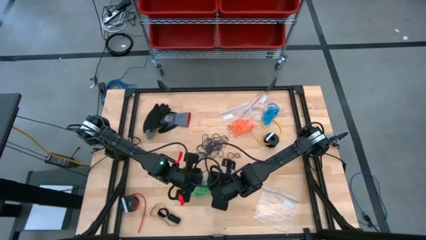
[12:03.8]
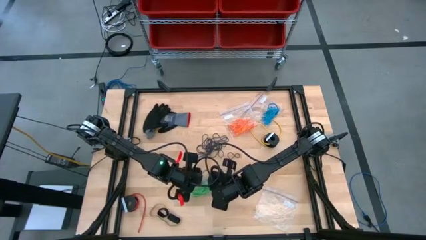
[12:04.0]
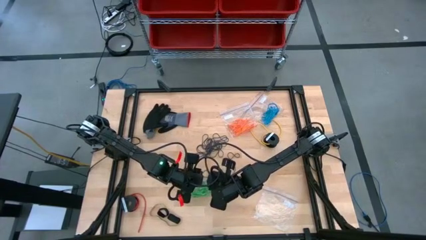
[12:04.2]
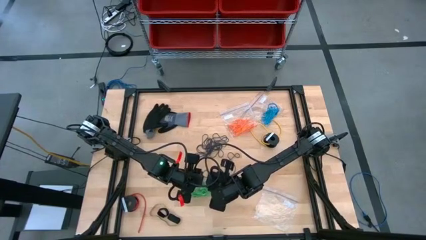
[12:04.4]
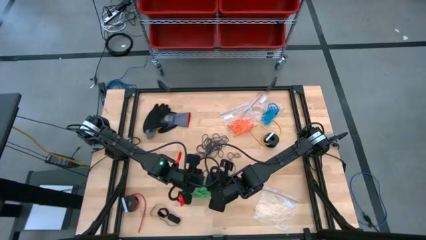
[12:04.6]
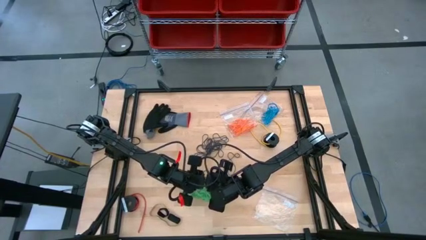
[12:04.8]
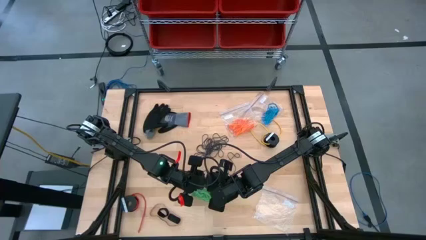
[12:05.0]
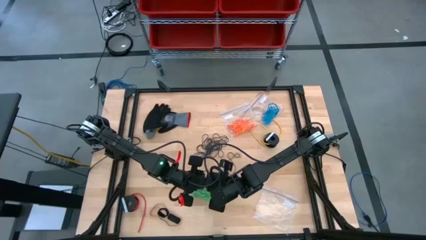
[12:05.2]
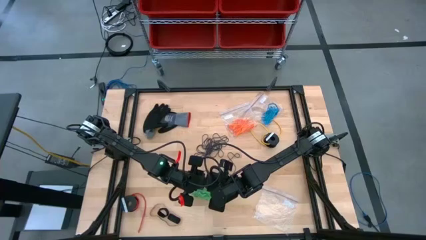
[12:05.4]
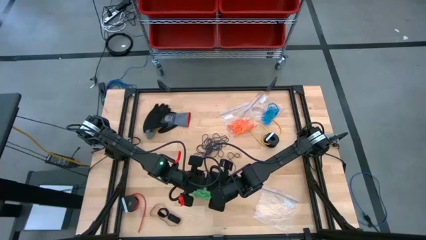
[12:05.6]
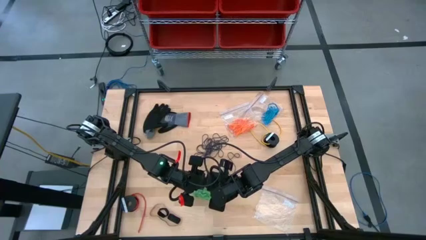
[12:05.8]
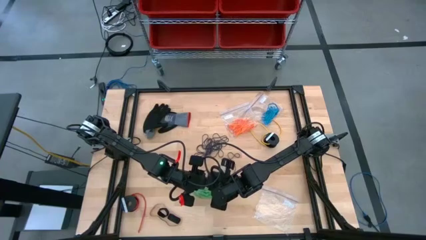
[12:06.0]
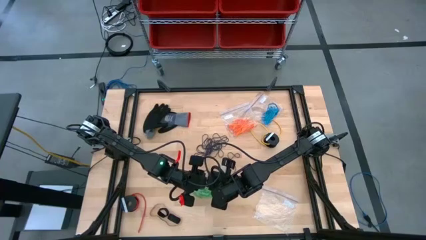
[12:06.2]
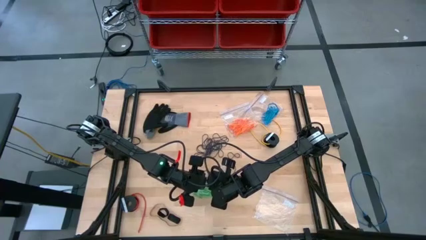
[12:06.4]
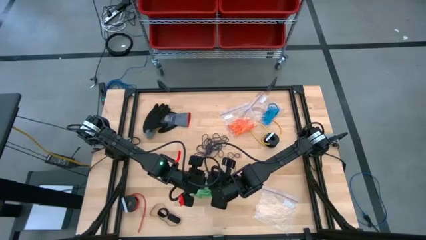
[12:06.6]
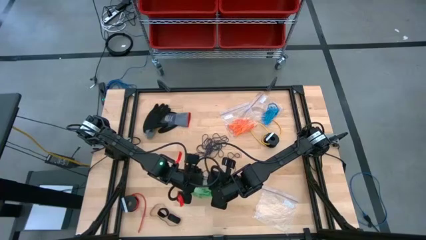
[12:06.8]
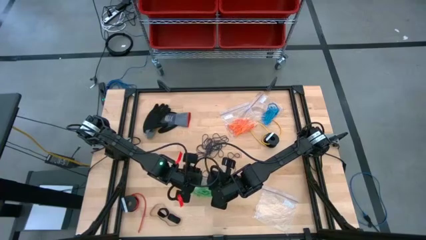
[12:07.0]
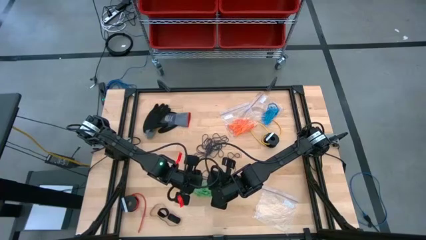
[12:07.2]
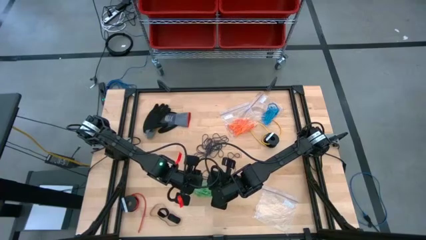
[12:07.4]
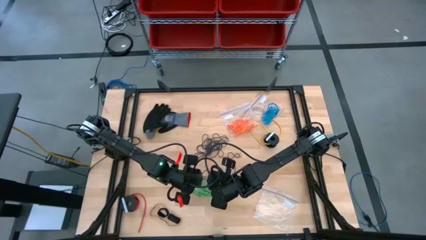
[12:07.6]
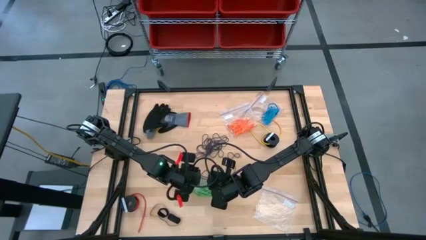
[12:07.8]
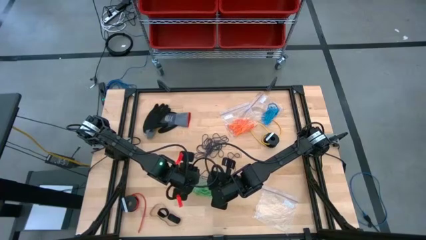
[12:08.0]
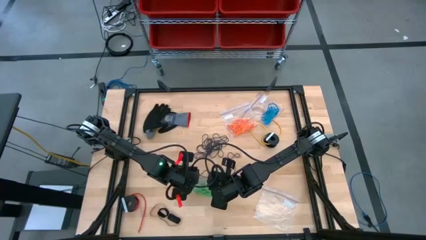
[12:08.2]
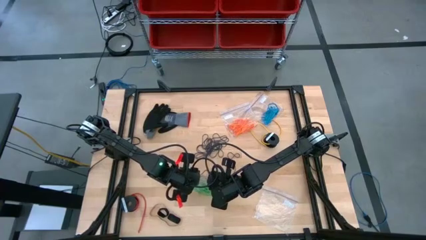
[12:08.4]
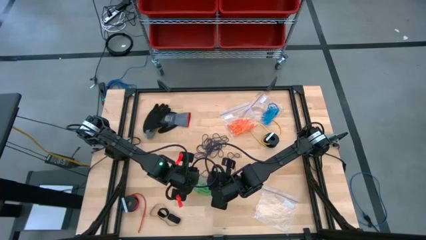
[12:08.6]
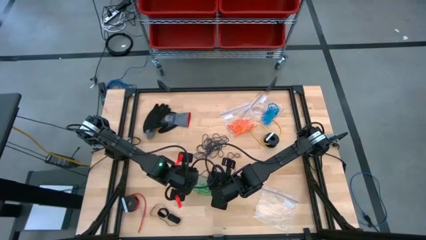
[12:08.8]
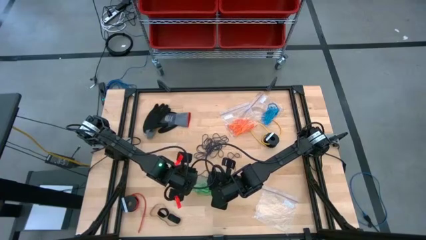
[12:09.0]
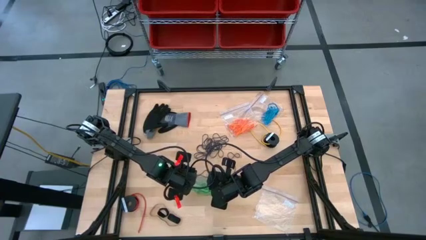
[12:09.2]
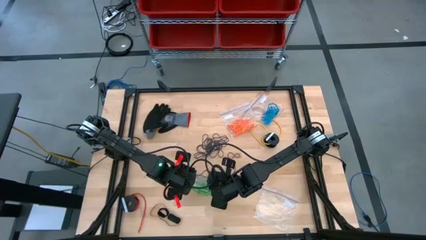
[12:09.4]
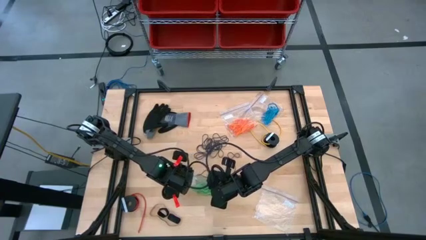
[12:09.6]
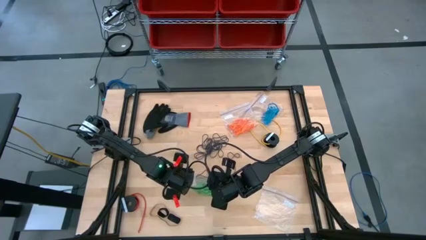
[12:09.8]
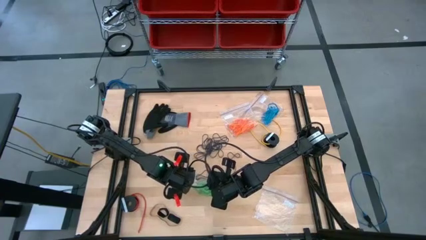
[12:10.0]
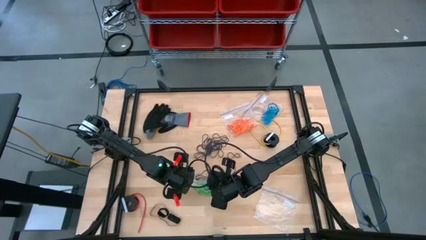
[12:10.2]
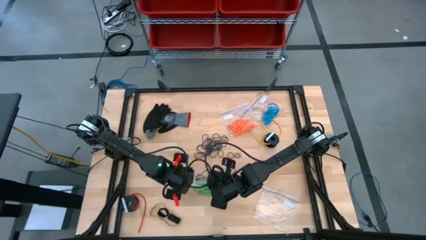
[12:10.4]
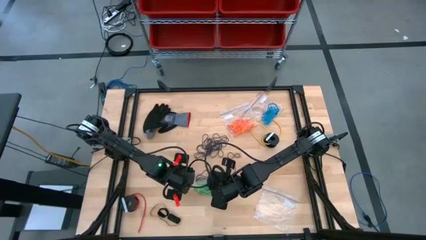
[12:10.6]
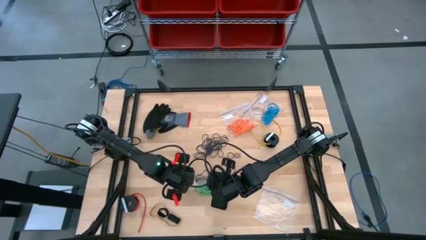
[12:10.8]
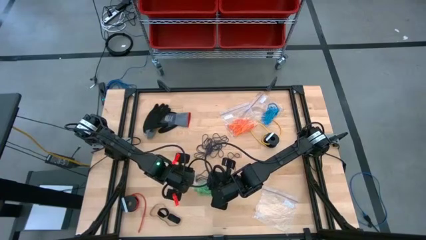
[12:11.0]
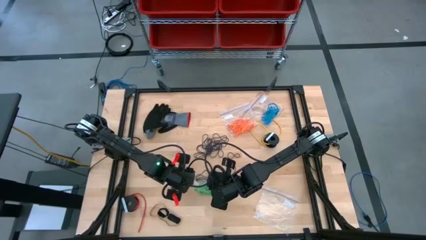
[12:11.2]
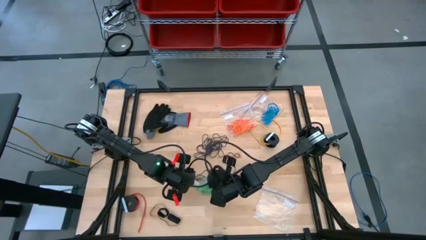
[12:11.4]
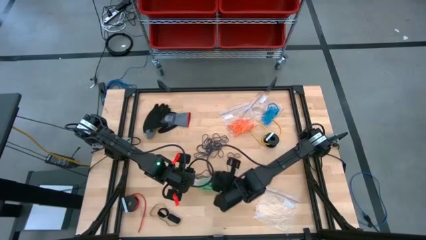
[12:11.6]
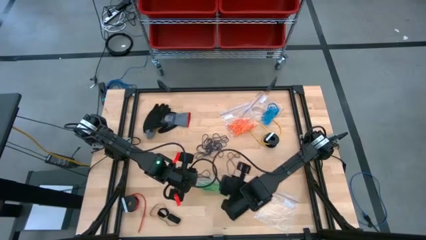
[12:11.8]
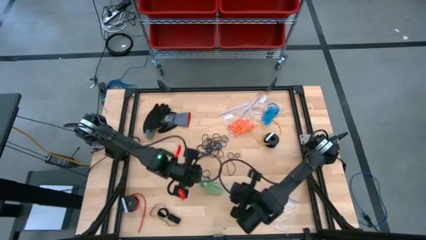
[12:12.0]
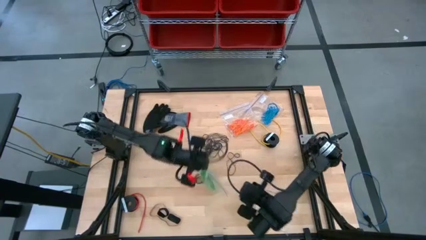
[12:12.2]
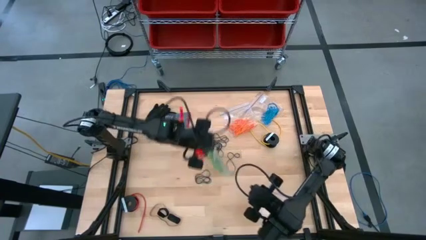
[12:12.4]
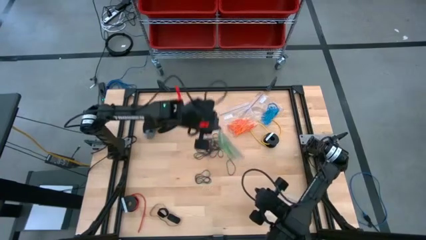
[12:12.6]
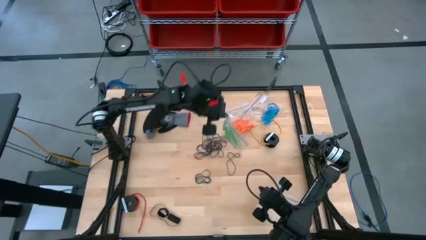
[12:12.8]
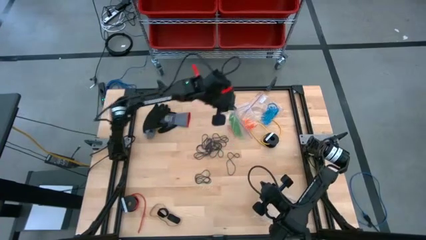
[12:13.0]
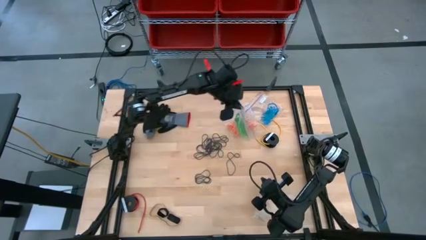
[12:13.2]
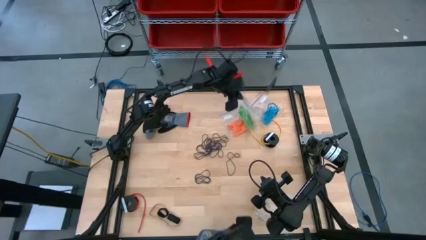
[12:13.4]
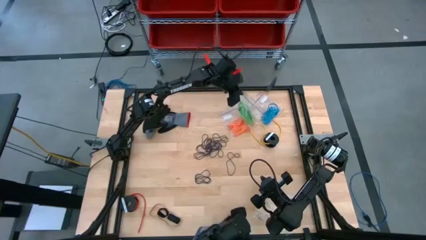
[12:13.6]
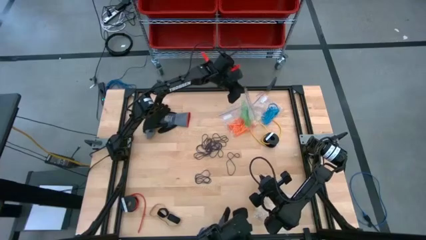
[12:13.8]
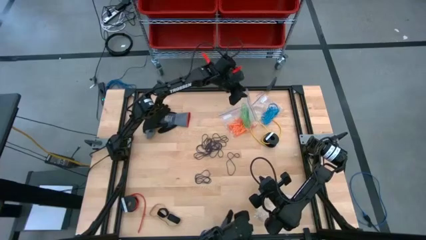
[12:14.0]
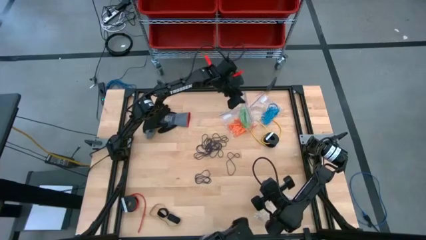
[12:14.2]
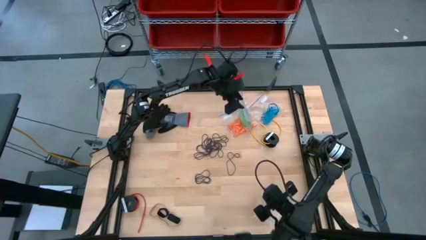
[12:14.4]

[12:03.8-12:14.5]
Task: Sort rubber bands
Close the transparent zip bag
